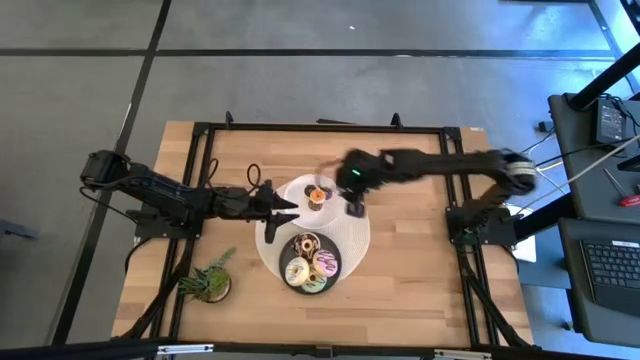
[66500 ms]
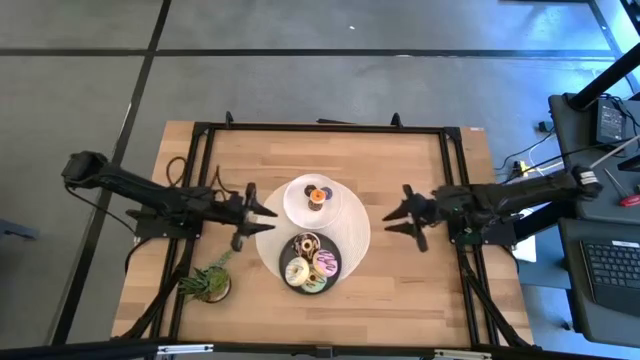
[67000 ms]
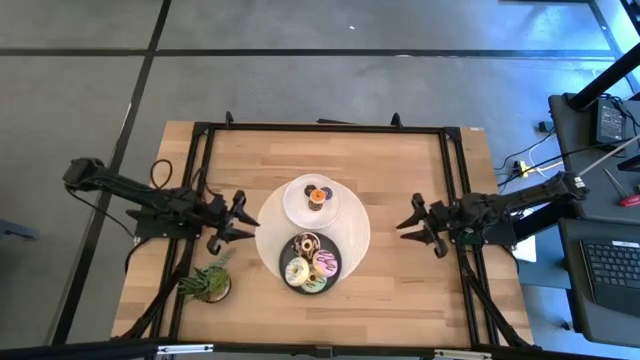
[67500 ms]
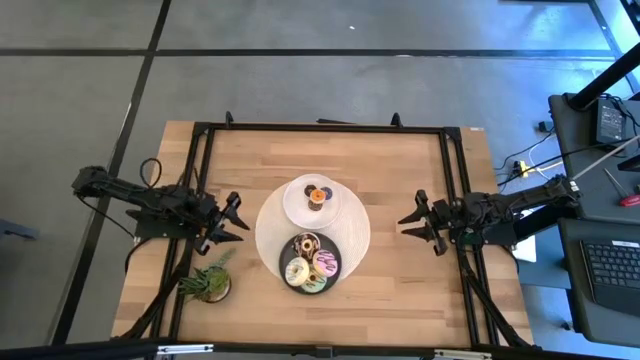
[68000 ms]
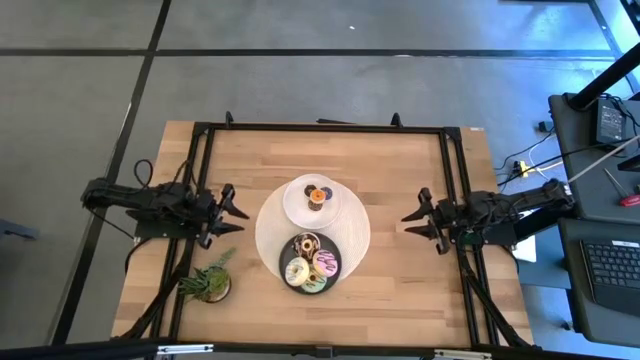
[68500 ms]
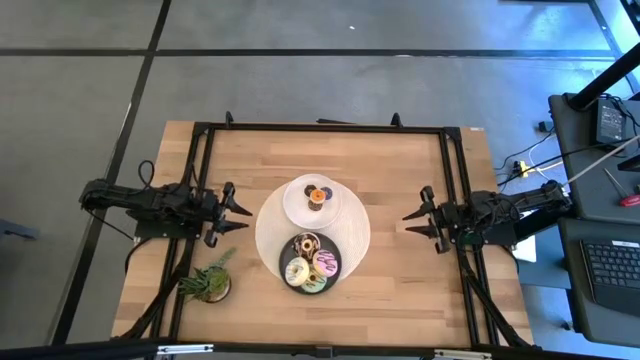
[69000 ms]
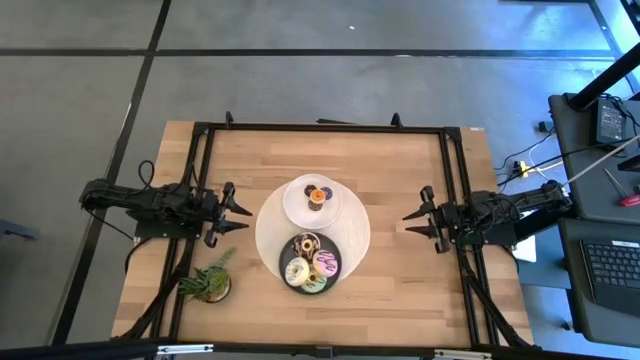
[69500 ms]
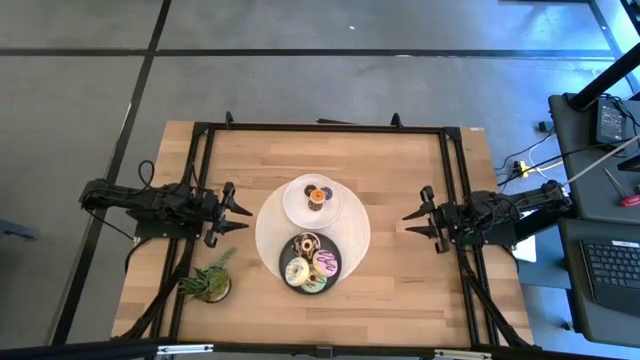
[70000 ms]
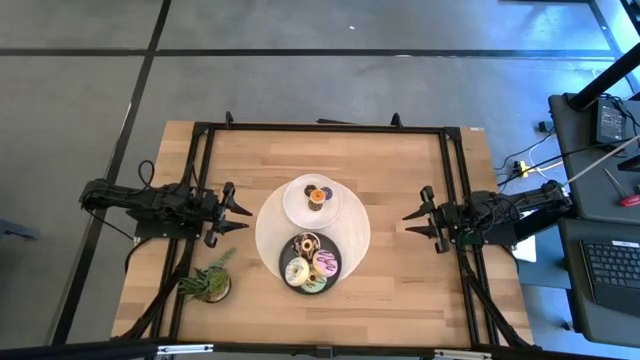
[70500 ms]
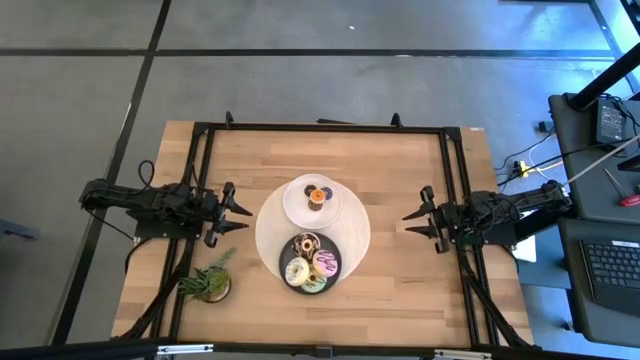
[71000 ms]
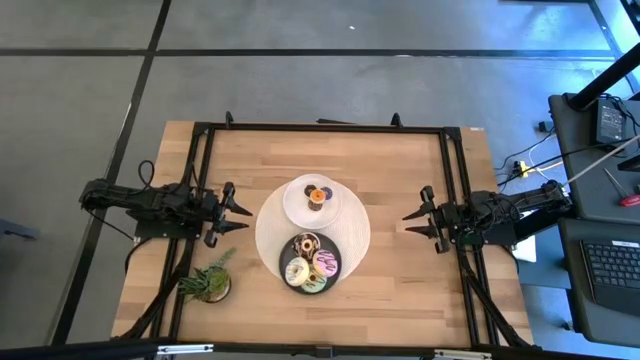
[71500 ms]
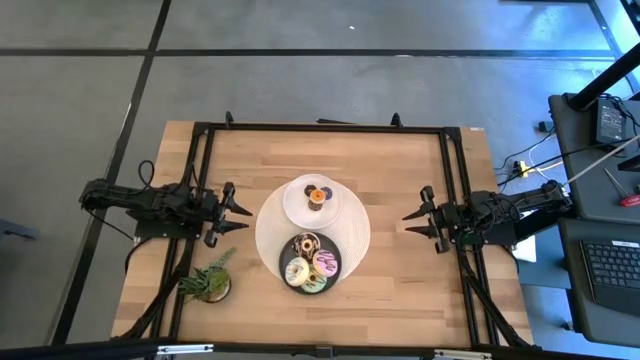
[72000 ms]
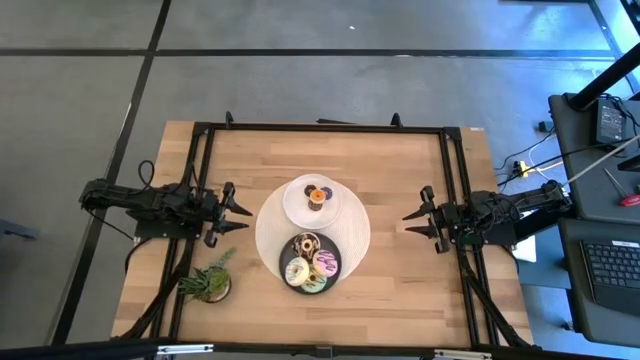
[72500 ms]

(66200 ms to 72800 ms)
Task: Pick & Place donuts
Return to Home Position

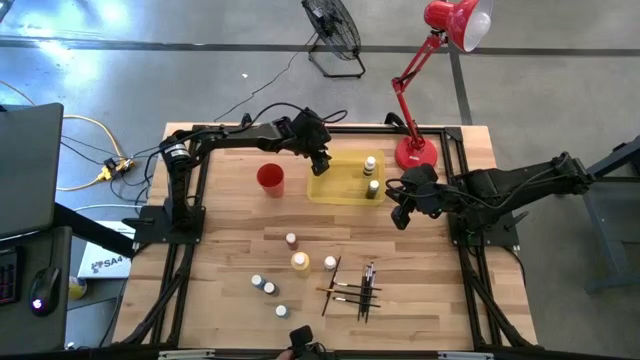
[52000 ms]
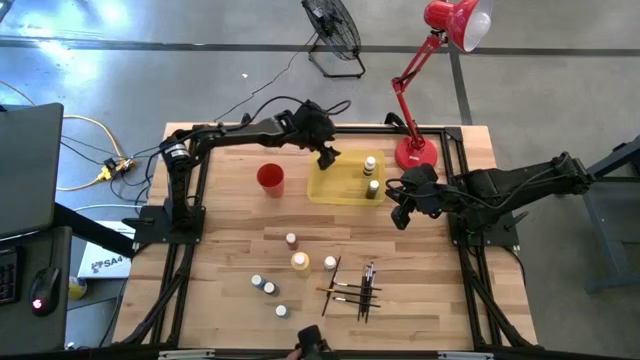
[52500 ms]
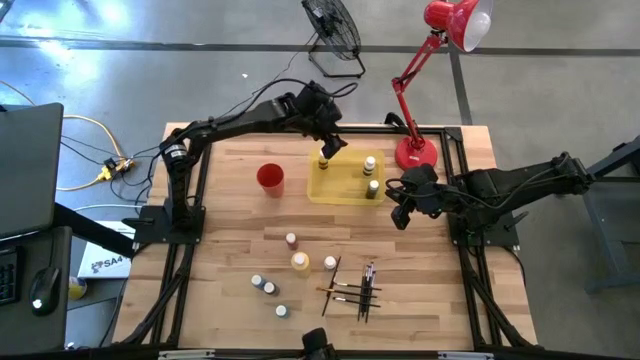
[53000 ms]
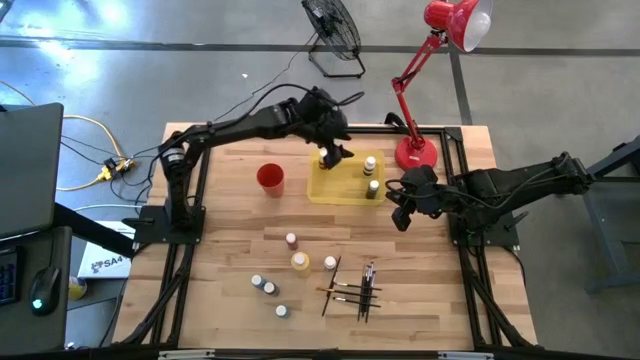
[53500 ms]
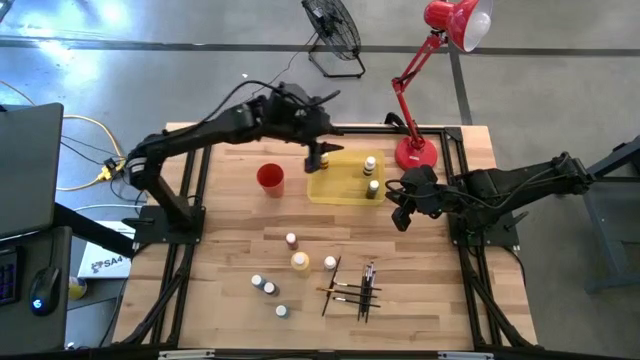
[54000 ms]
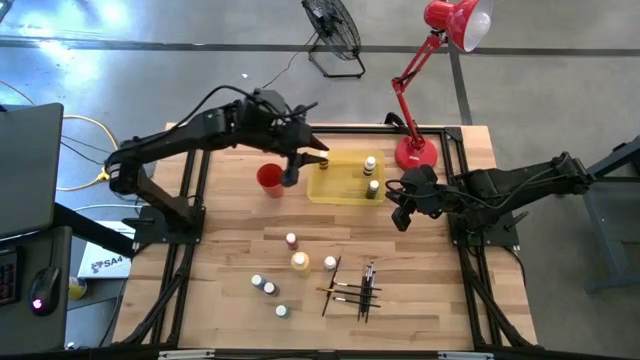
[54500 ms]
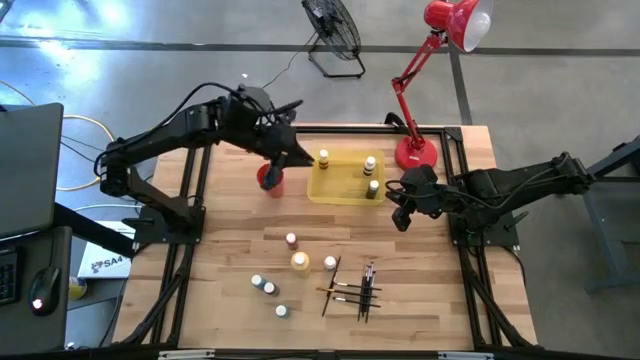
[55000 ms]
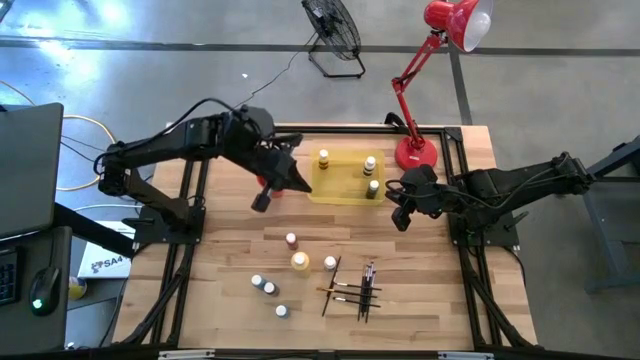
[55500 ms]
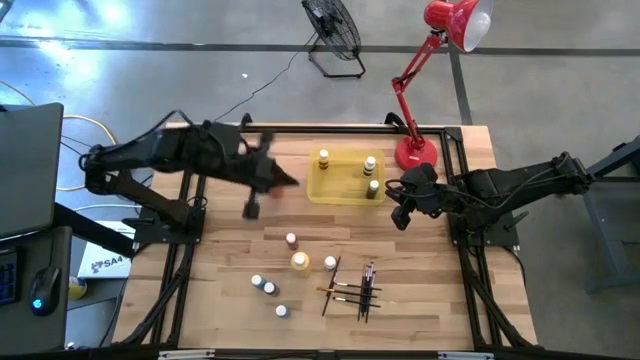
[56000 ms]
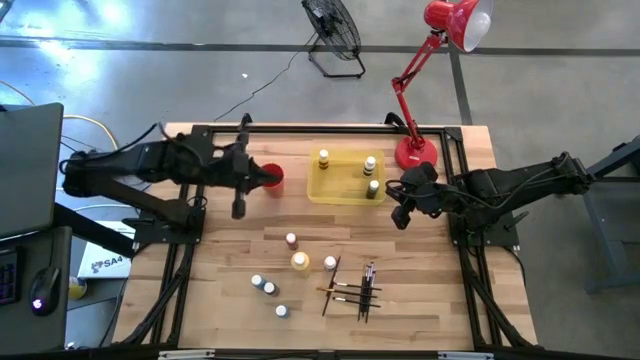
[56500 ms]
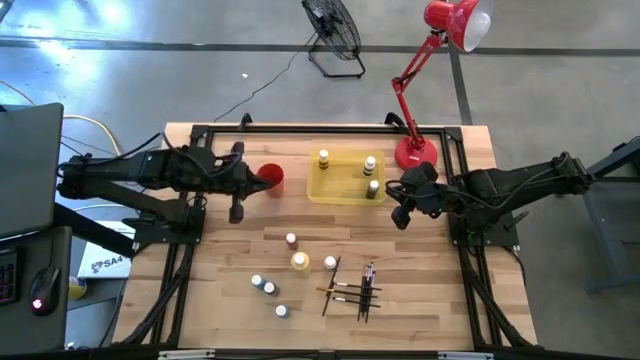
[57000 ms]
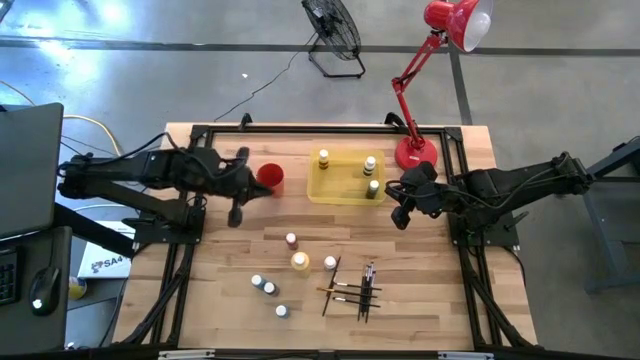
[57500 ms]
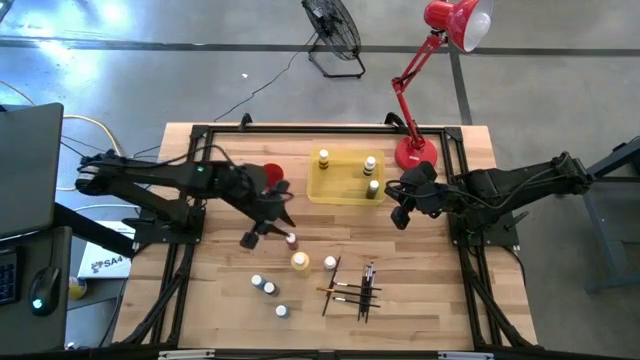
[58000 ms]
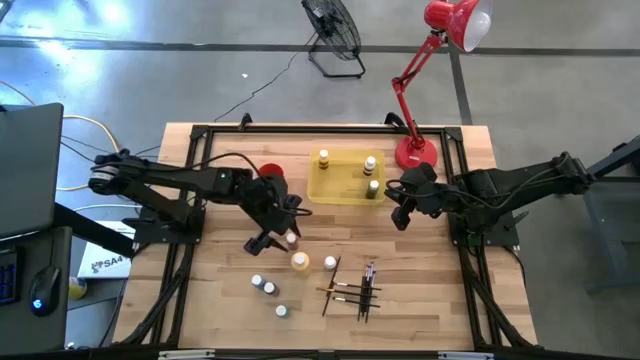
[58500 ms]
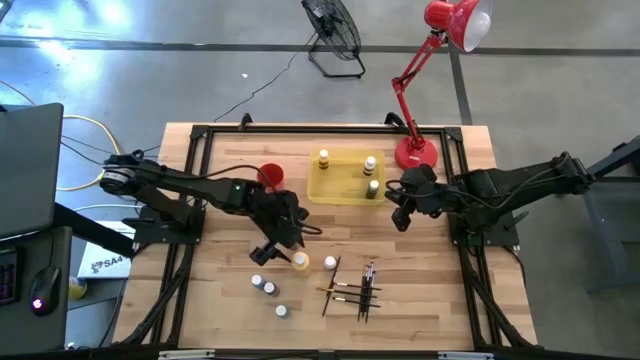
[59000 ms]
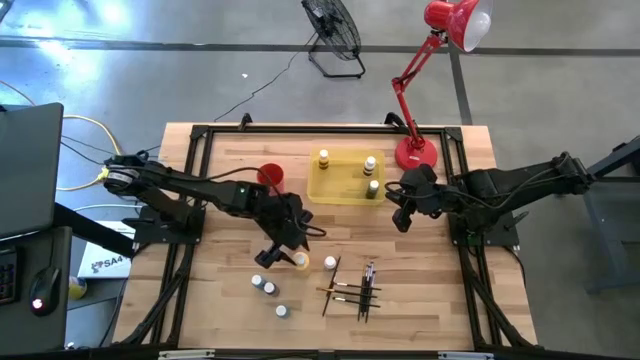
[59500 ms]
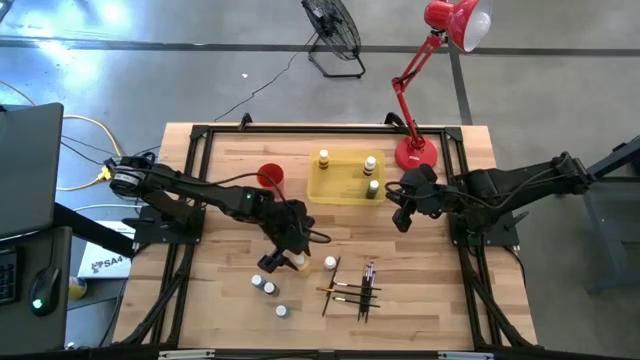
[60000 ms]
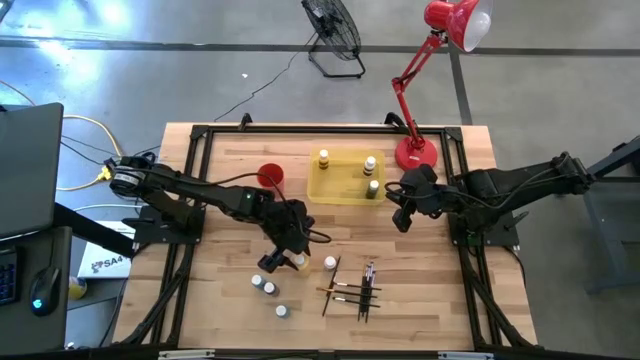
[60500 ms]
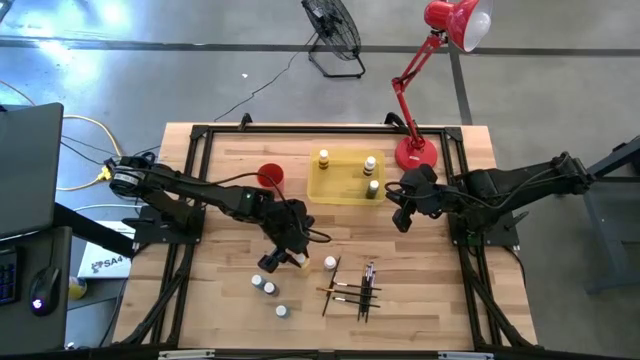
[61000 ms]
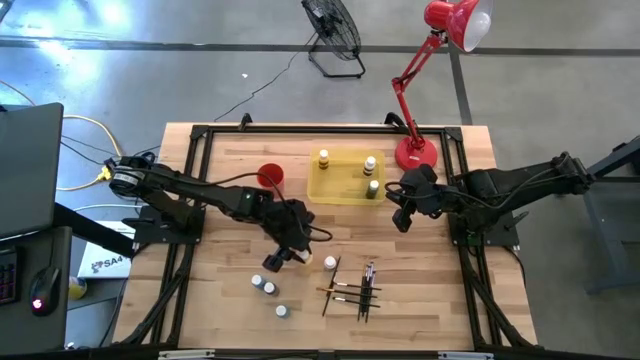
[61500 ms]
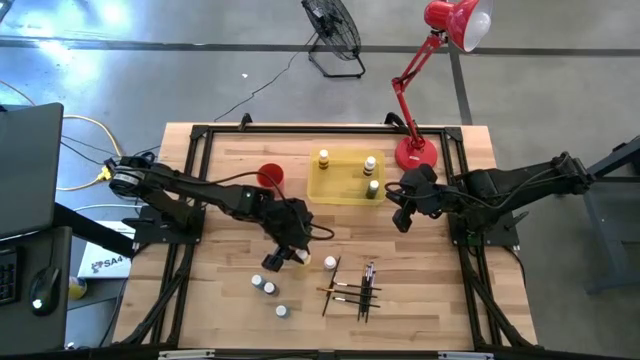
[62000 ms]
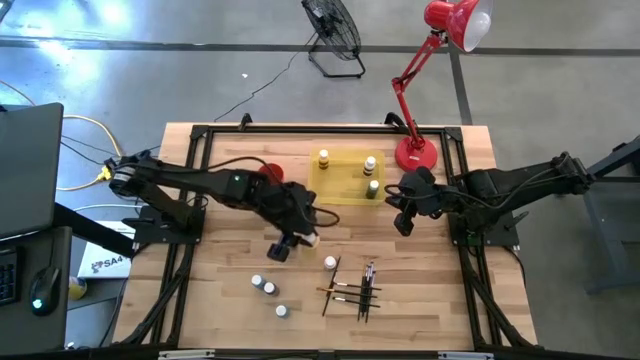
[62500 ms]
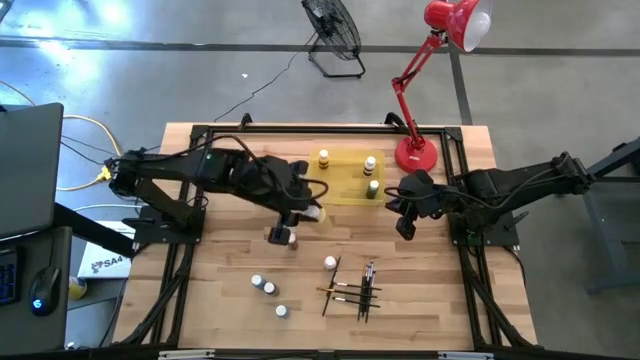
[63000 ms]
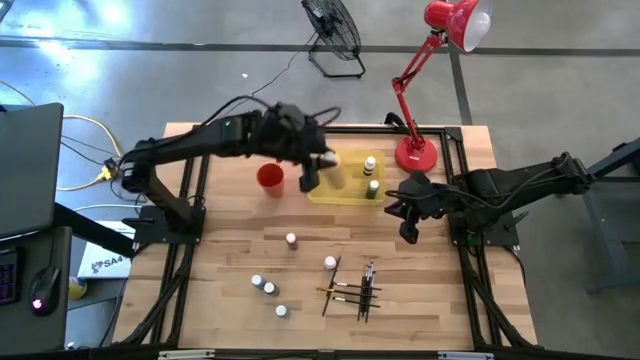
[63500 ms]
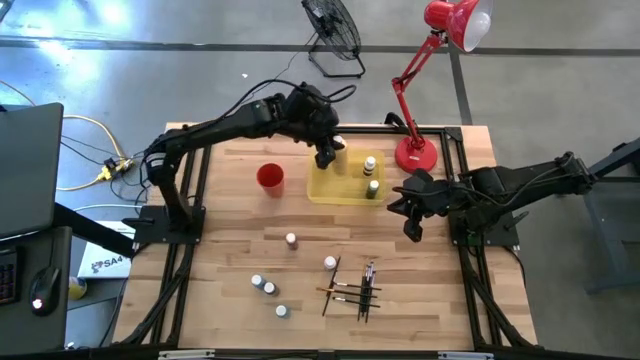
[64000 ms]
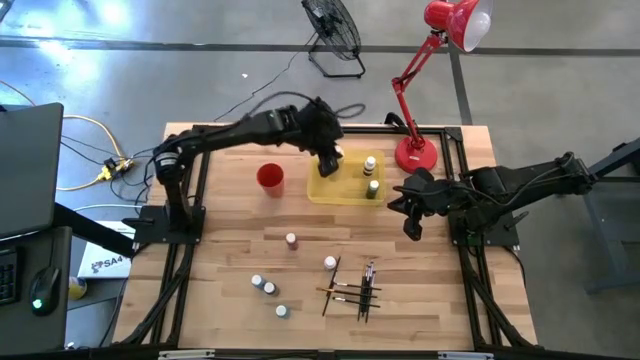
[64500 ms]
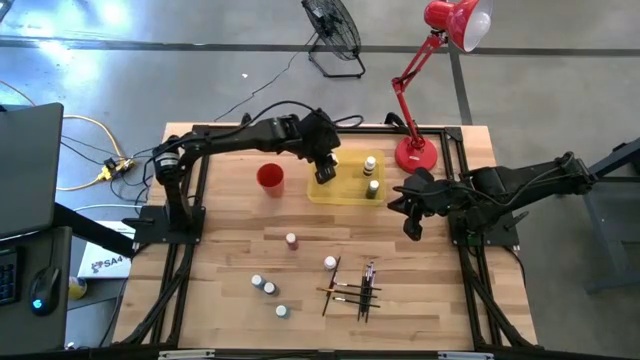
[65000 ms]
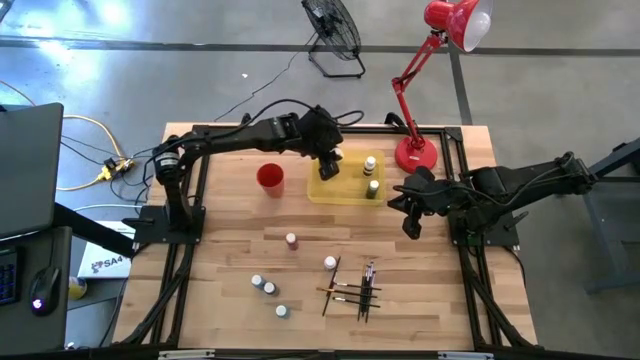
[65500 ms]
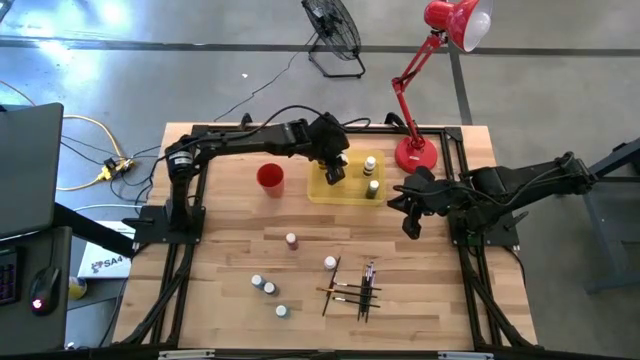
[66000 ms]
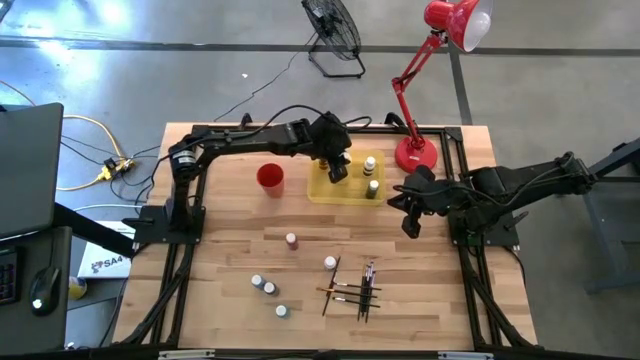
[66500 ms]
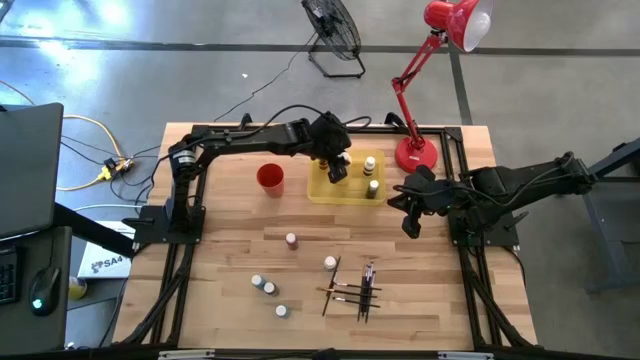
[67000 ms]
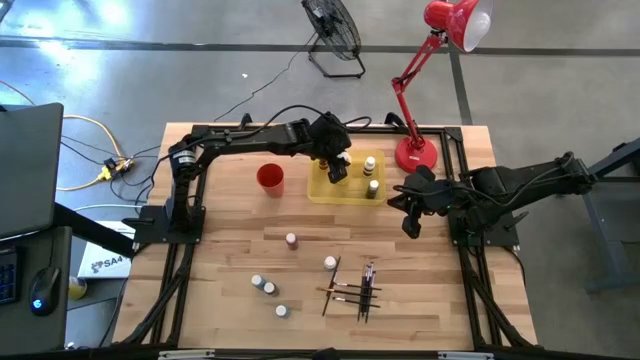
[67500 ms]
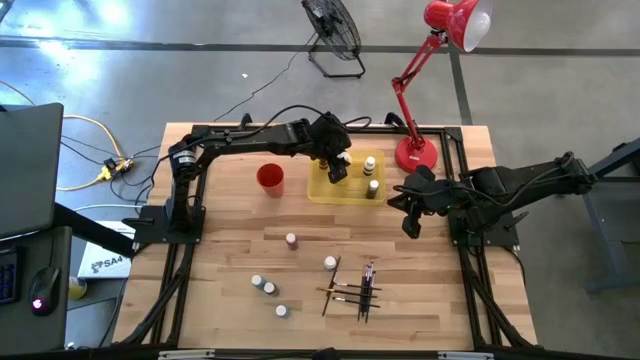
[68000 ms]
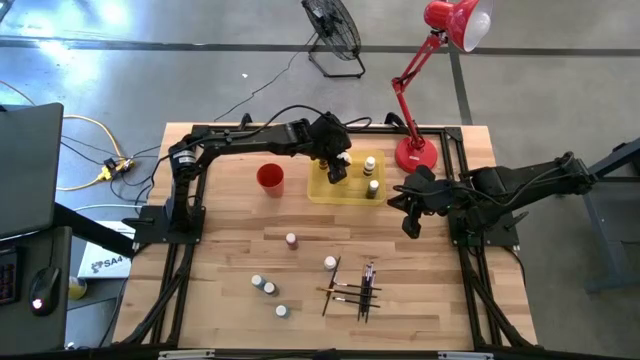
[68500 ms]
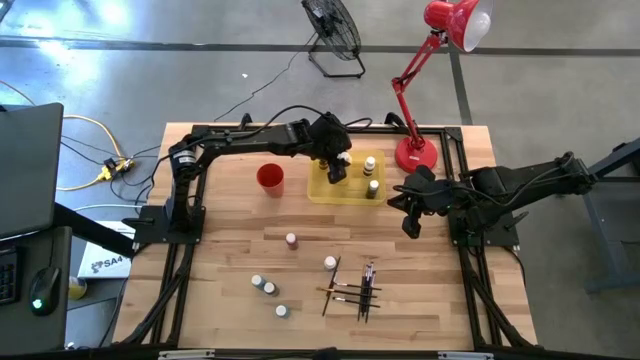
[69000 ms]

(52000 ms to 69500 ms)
Task: Pick & Place Paint Supplies
Put the light yellow paint bottle into the yellow bin
